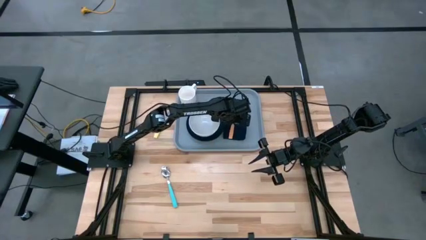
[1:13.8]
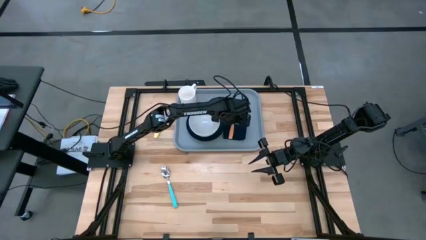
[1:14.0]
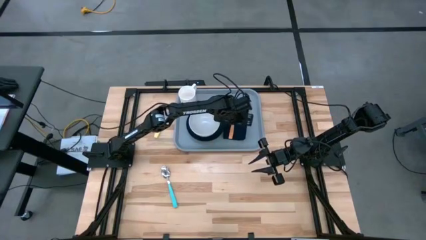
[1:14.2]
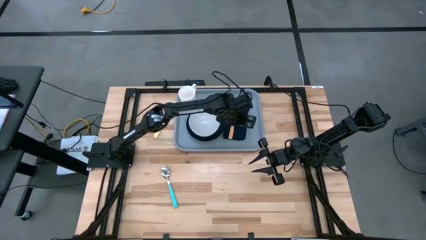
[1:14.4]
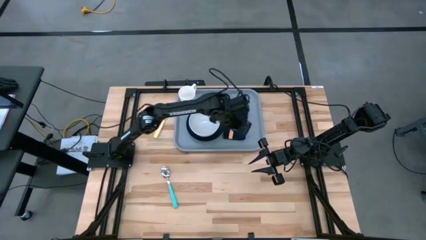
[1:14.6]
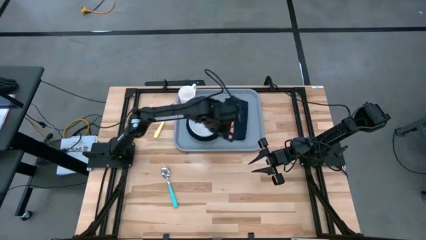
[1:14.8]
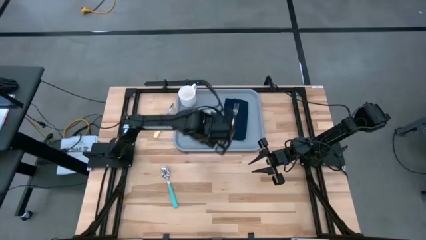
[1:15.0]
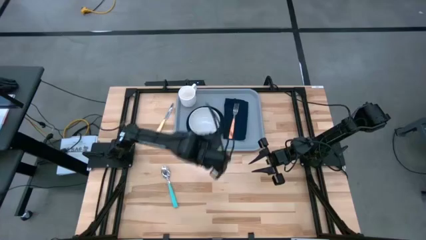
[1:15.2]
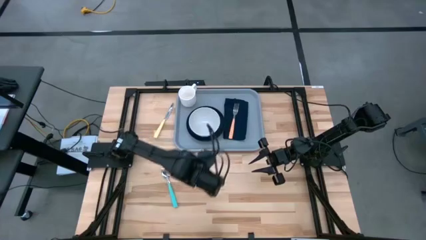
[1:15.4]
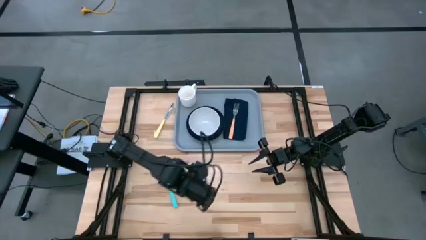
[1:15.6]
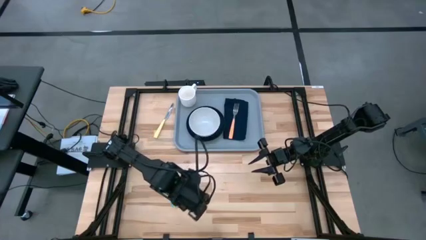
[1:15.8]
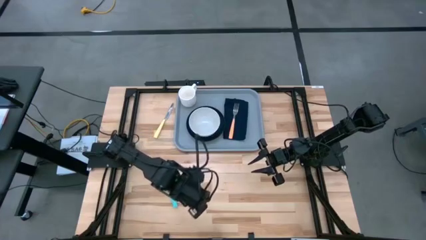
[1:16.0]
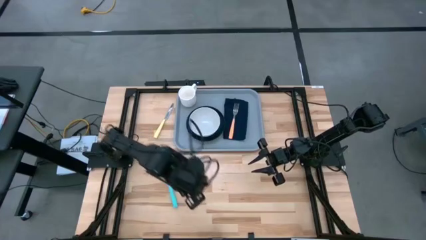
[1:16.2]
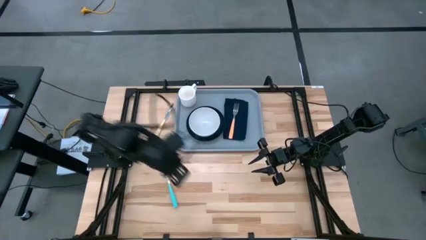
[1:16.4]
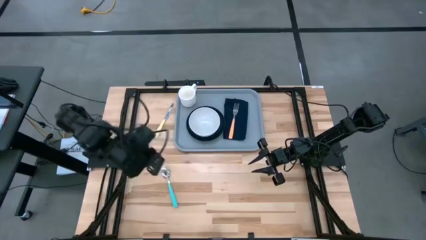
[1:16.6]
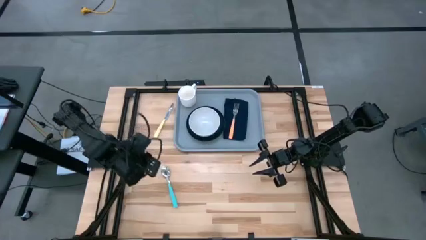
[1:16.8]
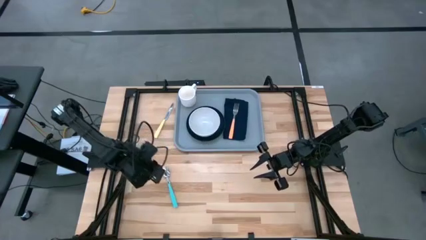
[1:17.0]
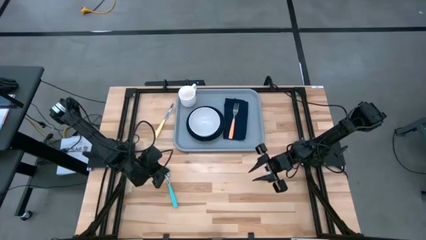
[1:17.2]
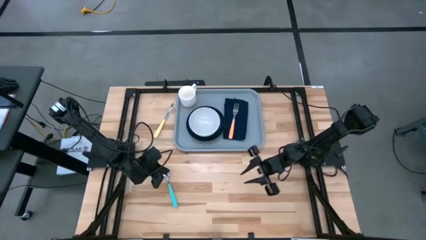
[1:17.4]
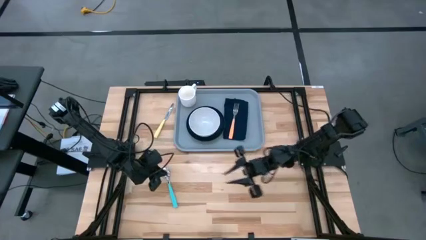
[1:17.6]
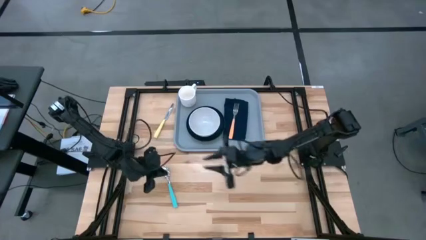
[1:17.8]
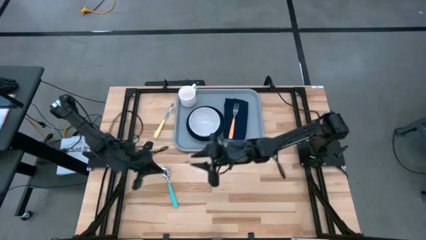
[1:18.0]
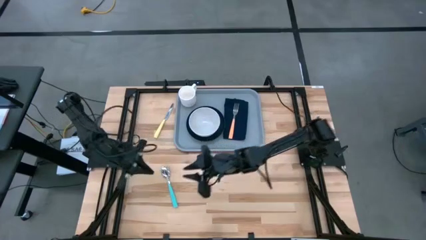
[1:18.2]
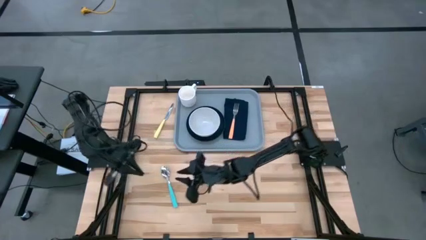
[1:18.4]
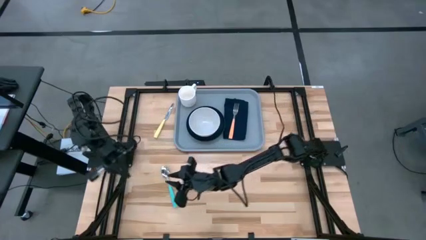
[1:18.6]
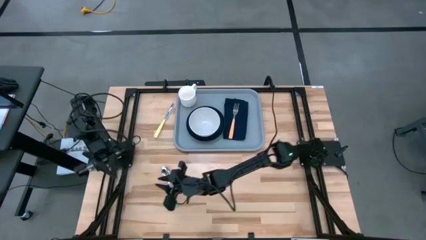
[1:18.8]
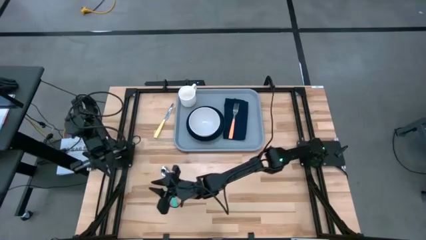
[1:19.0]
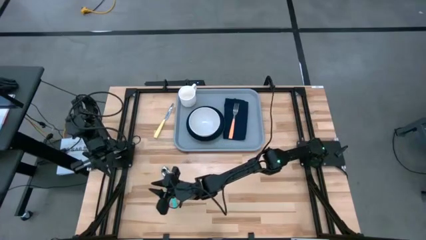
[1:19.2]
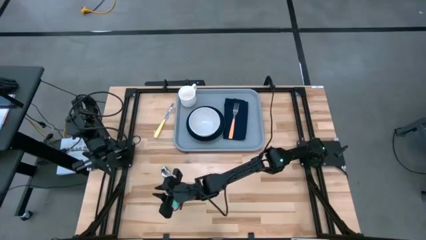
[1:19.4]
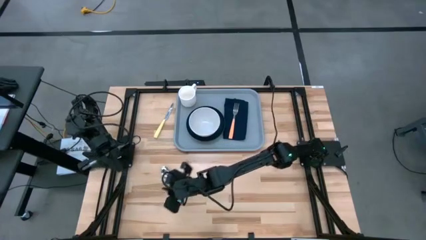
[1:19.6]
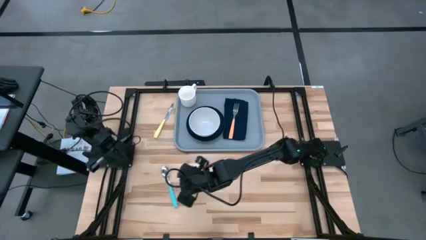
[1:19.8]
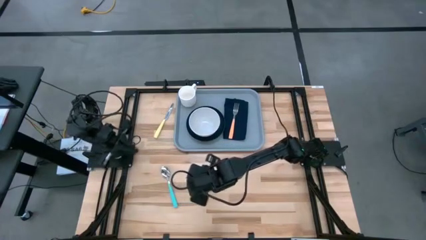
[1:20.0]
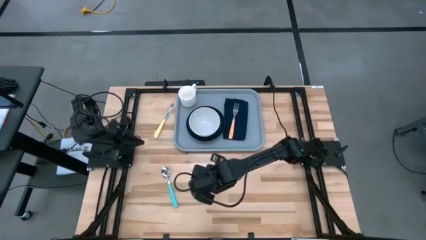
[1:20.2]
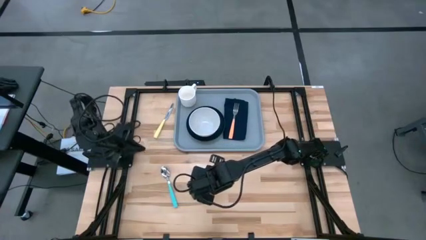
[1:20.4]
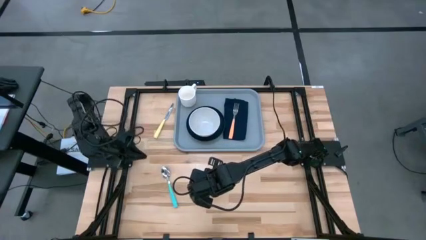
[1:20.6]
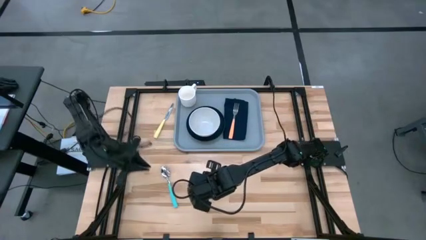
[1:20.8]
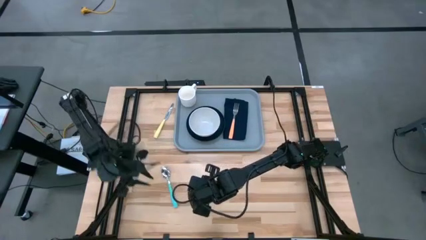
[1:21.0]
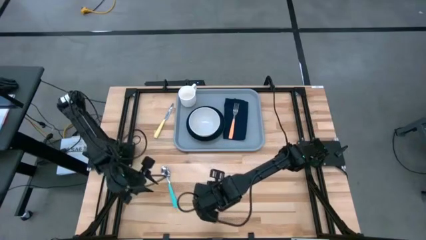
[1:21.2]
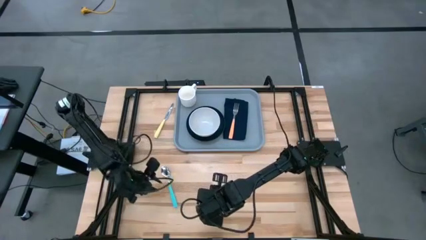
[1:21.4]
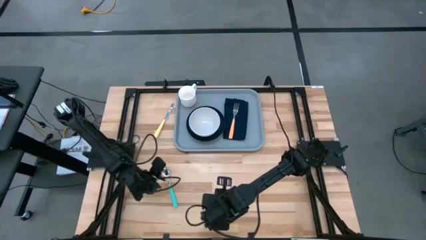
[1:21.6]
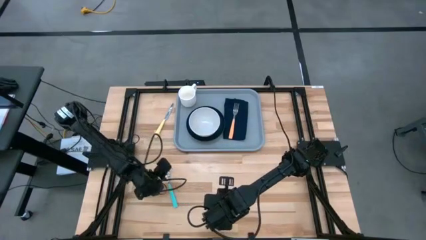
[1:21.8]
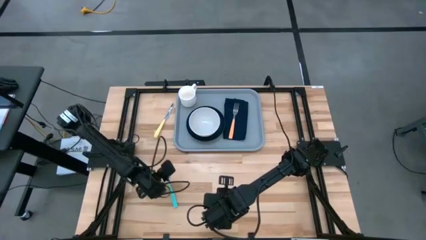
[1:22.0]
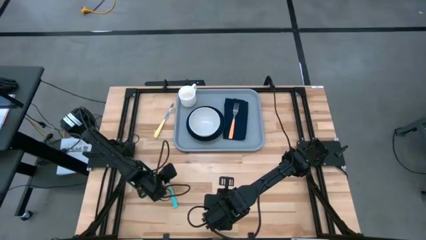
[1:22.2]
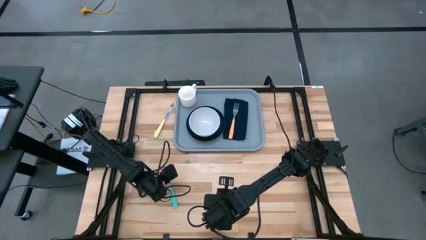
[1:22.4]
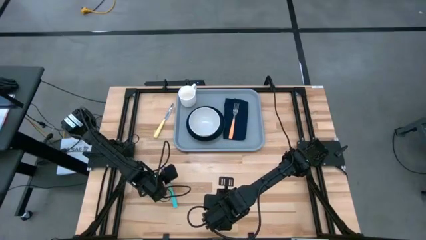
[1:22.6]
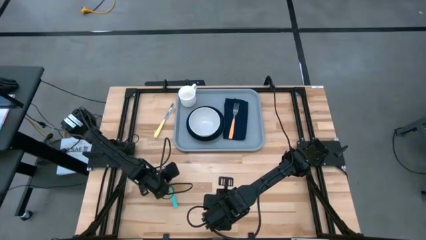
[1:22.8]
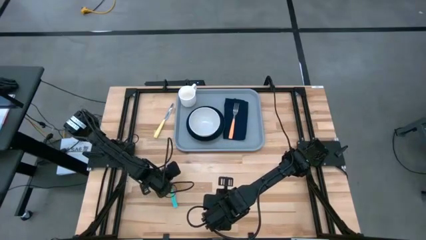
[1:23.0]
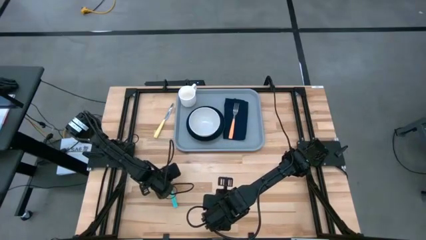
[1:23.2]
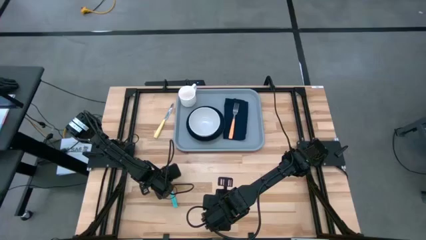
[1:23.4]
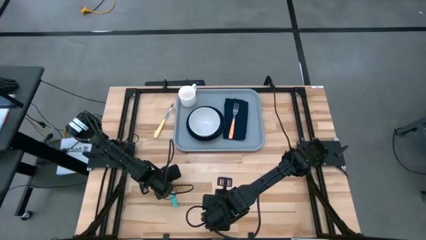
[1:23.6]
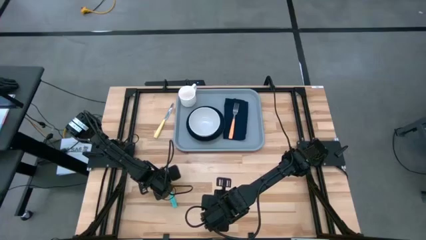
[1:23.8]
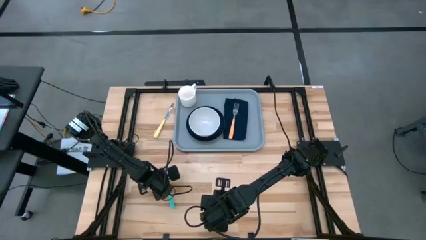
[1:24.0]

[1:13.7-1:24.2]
Task: Set up tray
Put the blue spoon to the left of the orange fork on the blue napkin on the gray tray

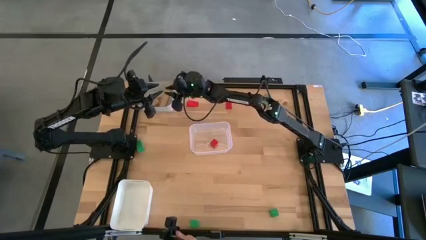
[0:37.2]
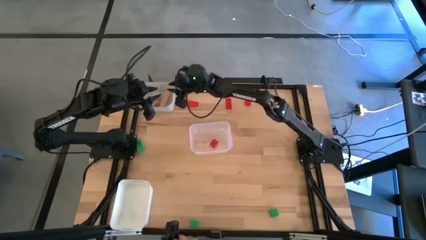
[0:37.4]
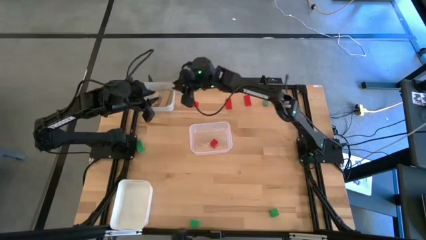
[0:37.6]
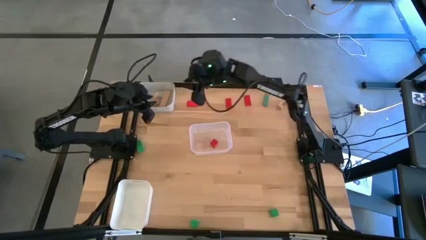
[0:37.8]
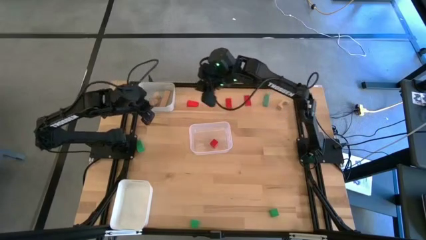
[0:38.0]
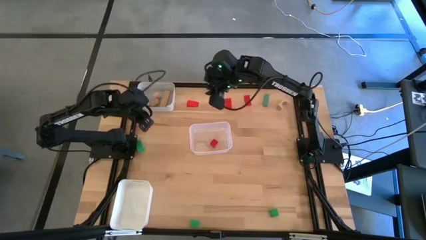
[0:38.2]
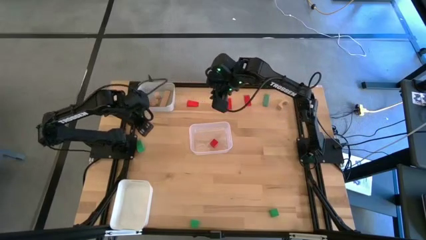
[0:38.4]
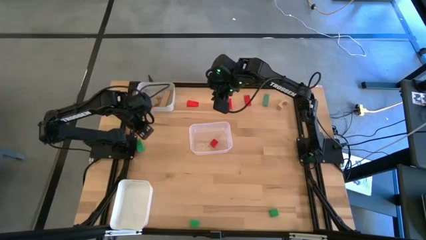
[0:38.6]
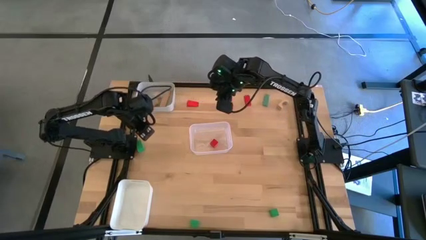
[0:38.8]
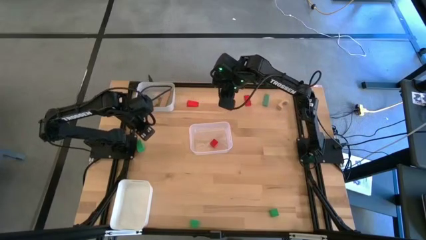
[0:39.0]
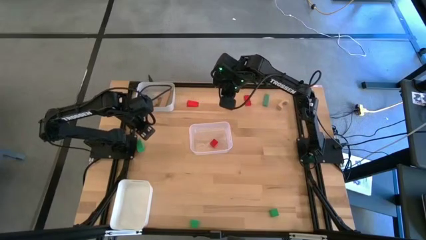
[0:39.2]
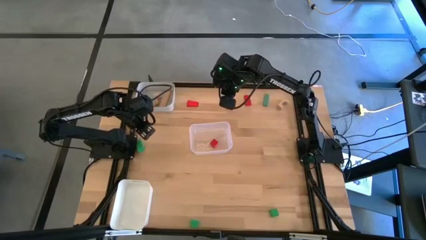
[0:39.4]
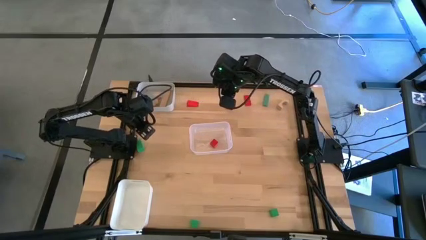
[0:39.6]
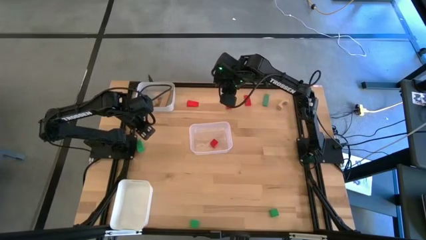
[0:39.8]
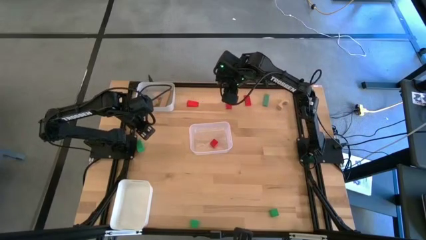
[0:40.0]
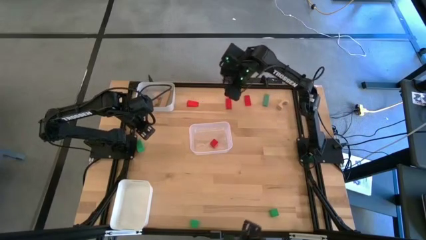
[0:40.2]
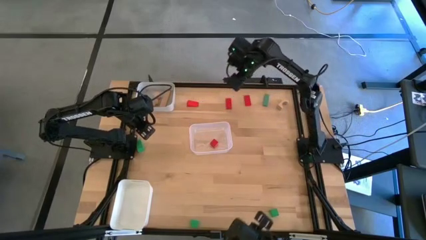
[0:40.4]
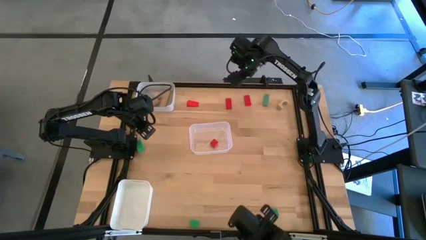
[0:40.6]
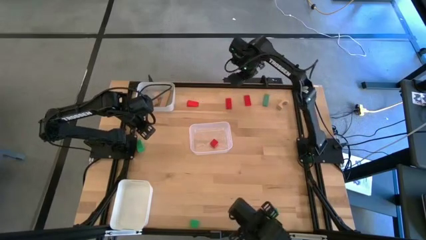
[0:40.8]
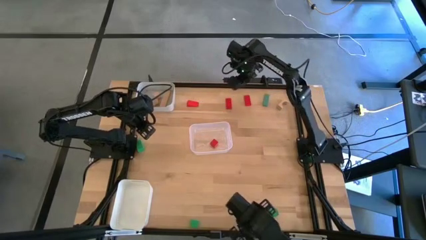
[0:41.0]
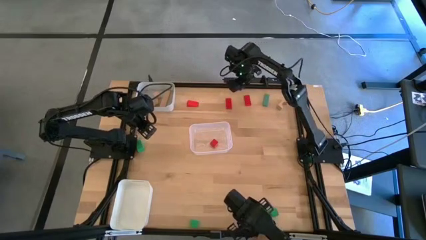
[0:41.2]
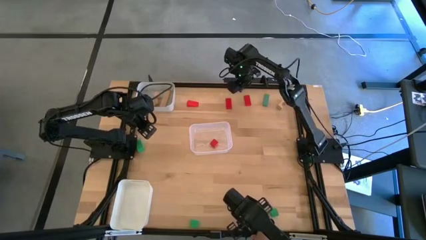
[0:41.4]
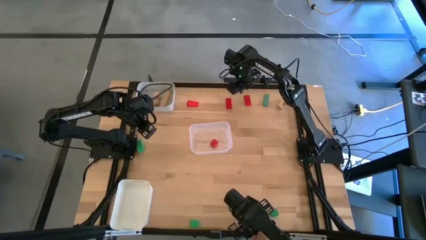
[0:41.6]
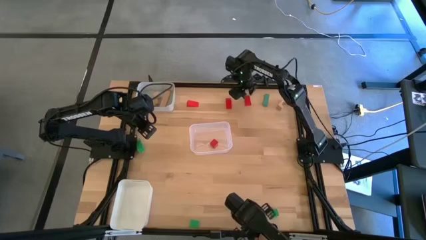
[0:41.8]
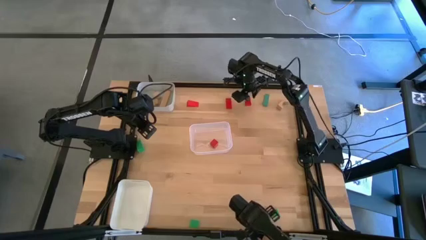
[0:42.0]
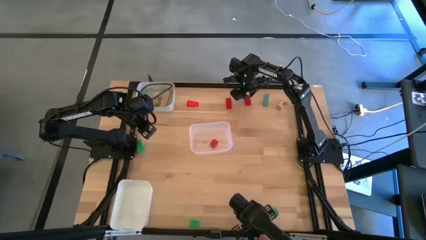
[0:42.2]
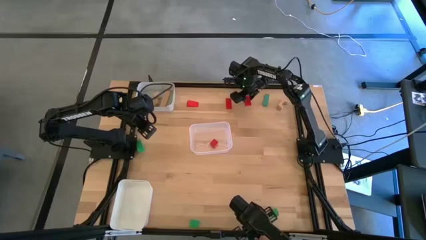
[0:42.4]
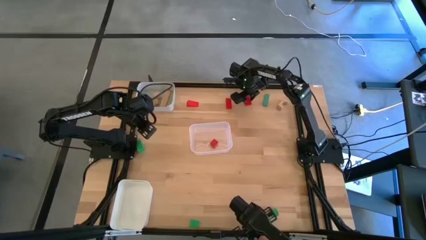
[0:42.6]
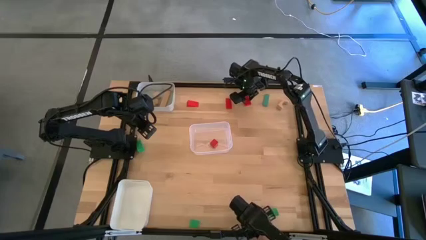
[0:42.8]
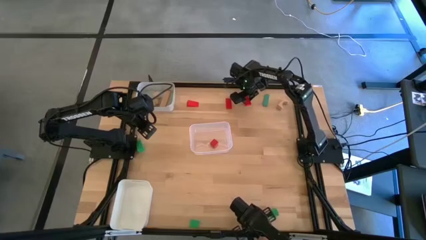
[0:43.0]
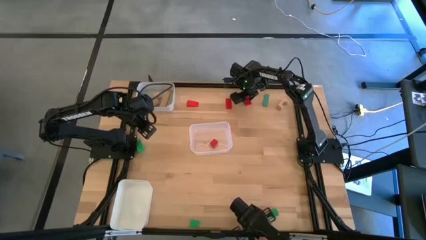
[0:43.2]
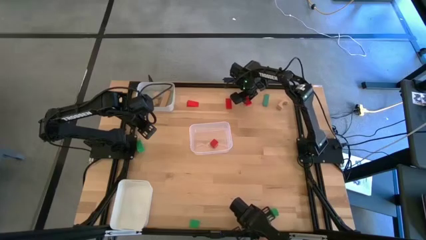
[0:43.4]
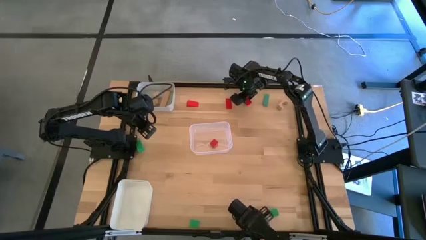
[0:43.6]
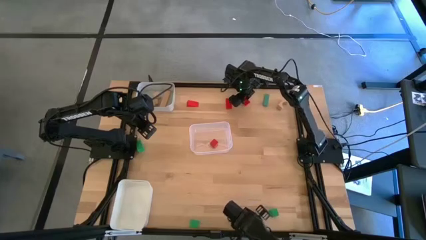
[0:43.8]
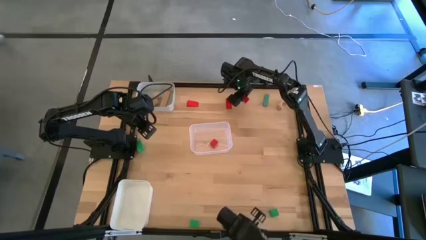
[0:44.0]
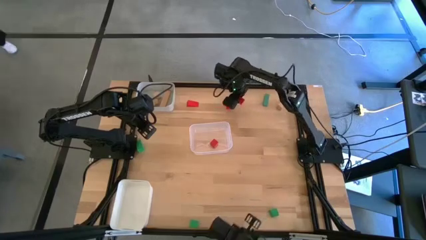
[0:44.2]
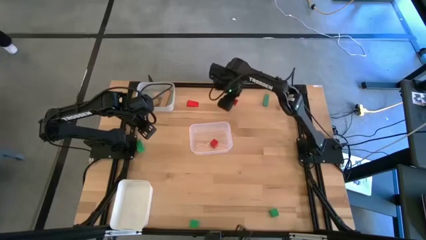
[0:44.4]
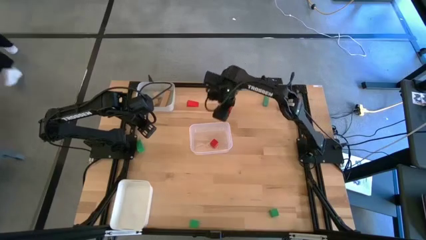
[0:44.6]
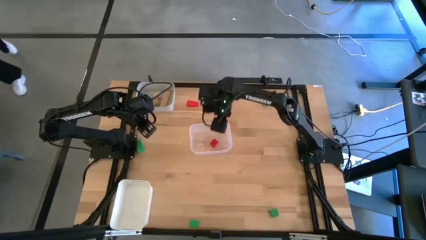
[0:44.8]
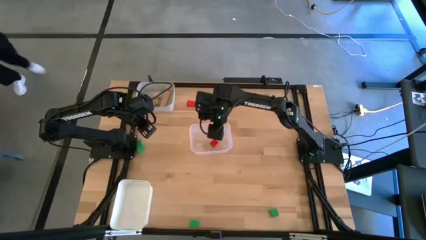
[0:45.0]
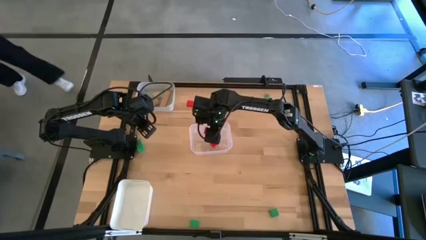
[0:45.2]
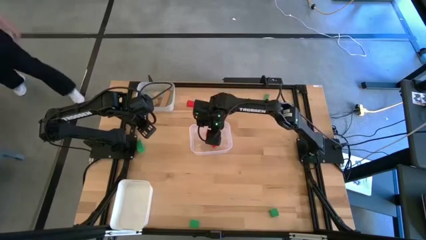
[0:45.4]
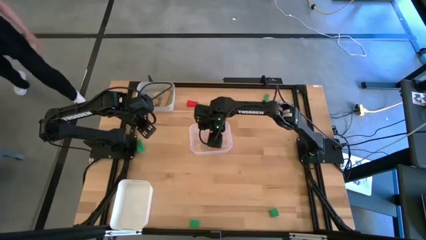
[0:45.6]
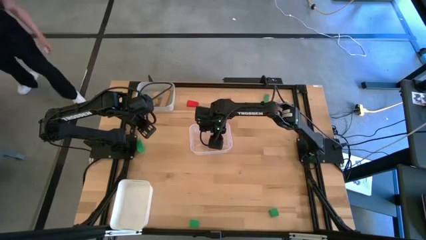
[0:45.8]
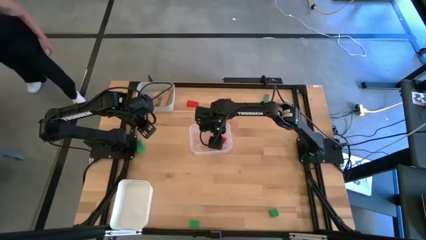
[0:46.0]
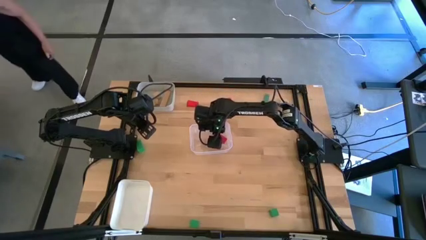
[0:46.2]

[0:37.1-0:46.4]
Task: Sort & place blocks by color
Put the right red block into the transparent bin
